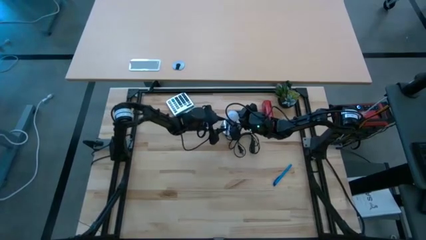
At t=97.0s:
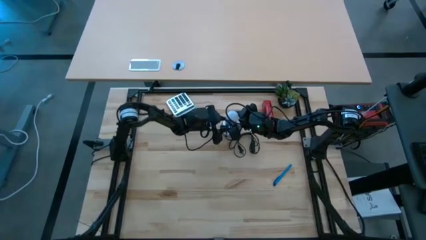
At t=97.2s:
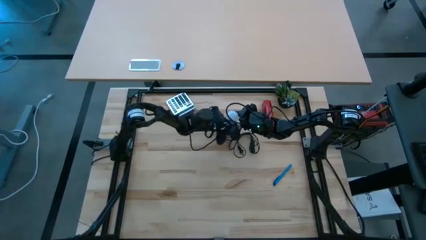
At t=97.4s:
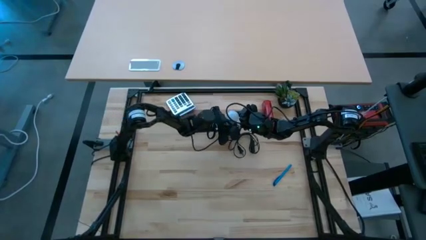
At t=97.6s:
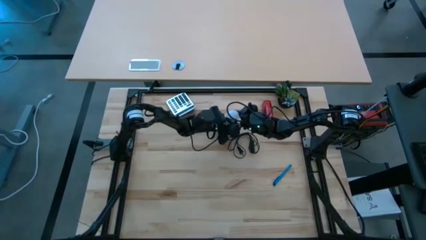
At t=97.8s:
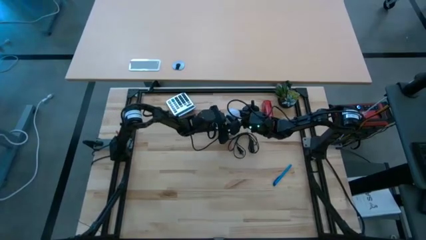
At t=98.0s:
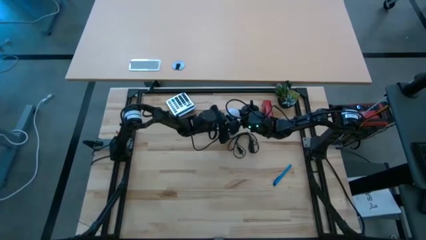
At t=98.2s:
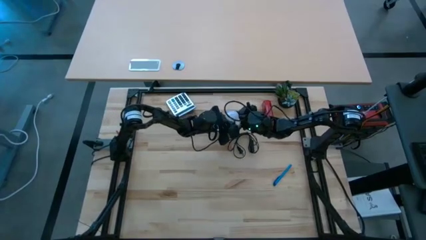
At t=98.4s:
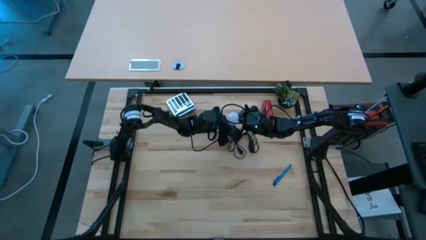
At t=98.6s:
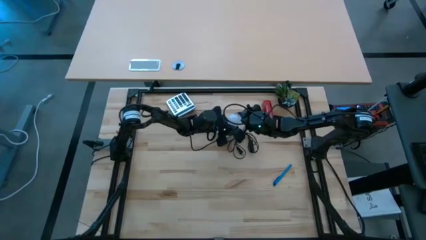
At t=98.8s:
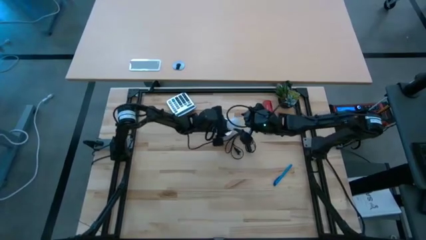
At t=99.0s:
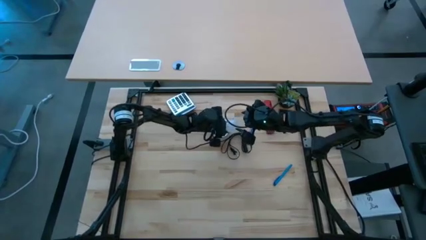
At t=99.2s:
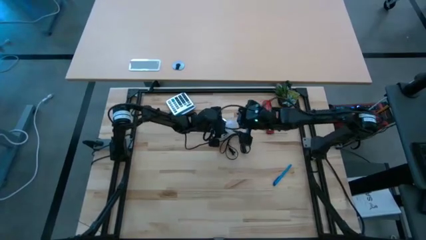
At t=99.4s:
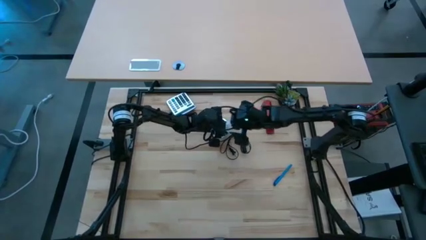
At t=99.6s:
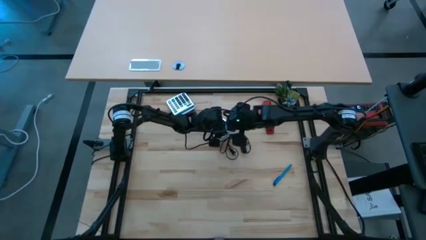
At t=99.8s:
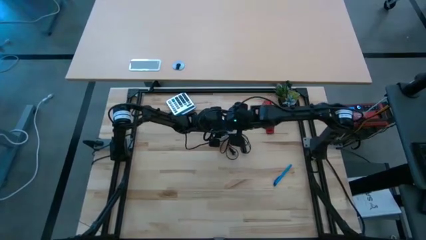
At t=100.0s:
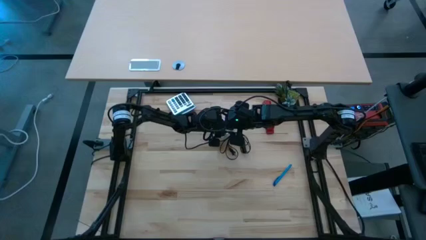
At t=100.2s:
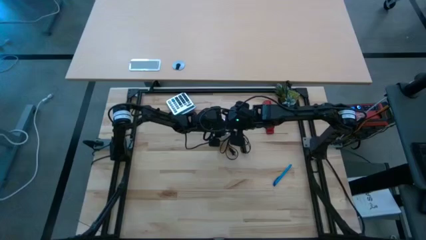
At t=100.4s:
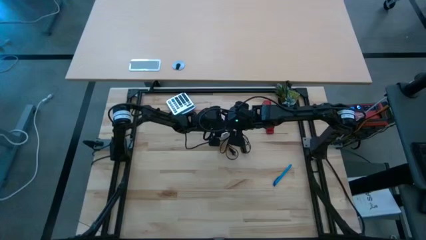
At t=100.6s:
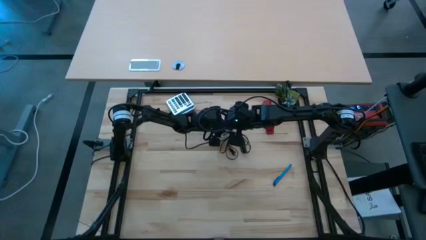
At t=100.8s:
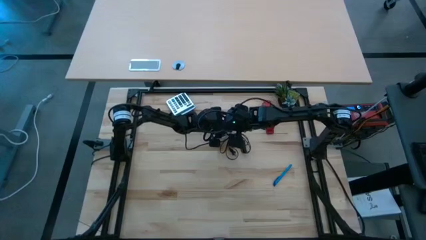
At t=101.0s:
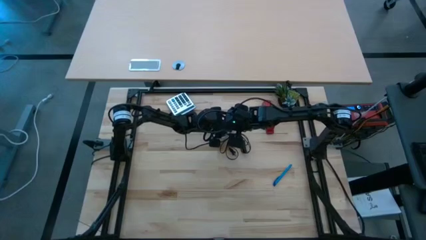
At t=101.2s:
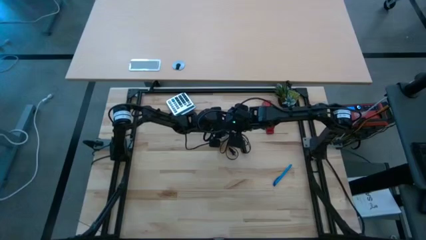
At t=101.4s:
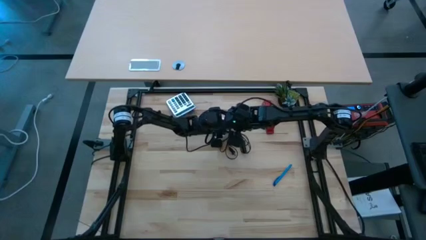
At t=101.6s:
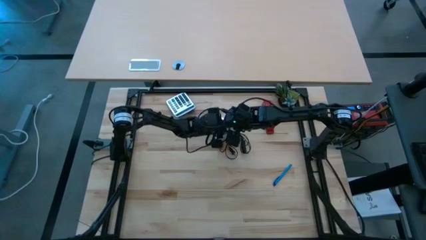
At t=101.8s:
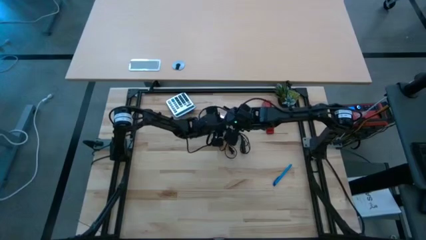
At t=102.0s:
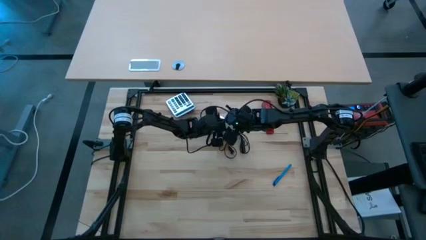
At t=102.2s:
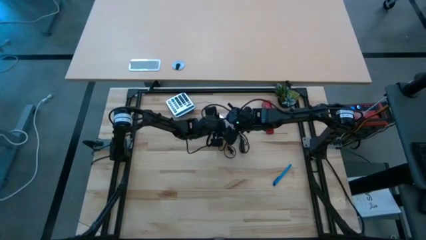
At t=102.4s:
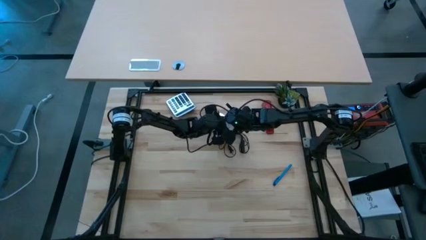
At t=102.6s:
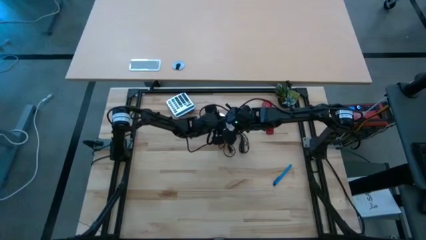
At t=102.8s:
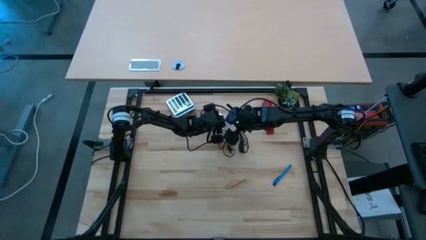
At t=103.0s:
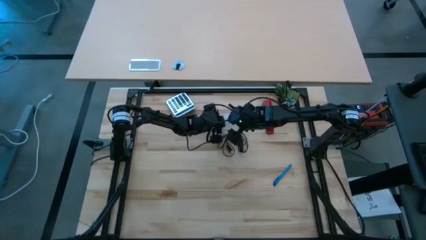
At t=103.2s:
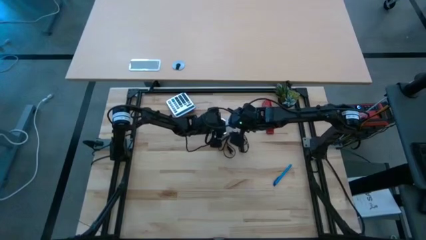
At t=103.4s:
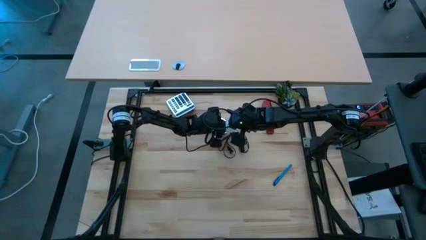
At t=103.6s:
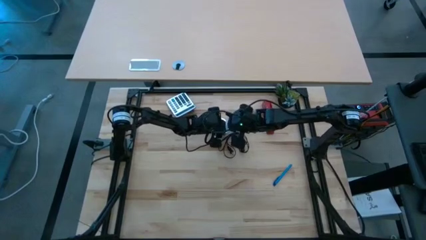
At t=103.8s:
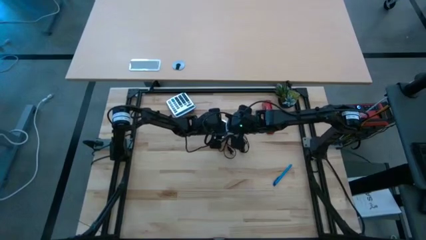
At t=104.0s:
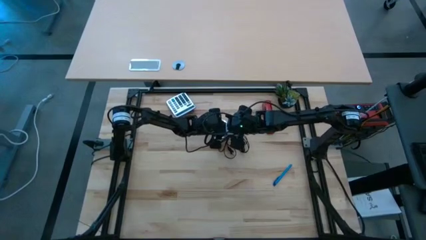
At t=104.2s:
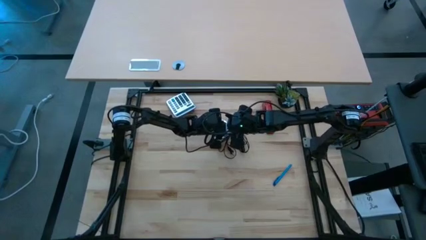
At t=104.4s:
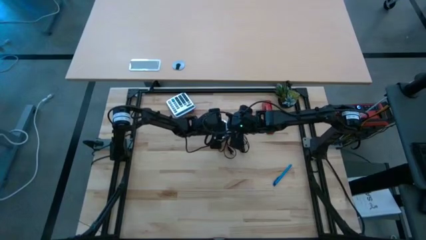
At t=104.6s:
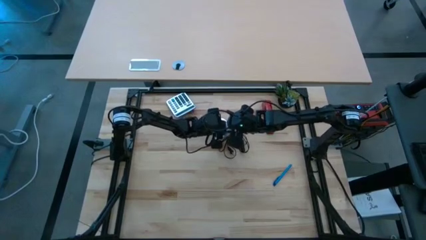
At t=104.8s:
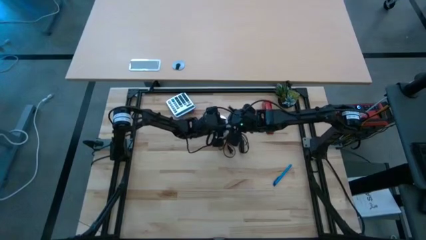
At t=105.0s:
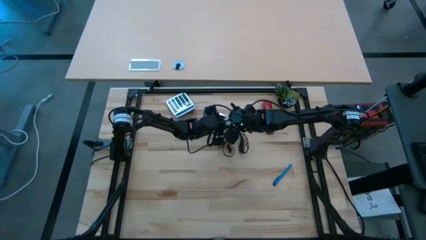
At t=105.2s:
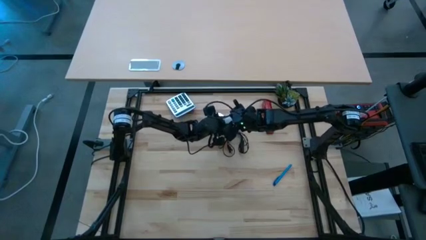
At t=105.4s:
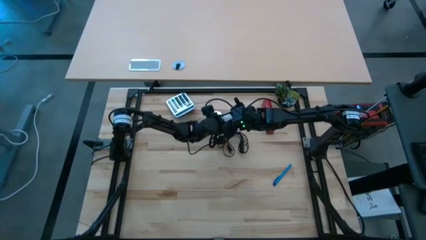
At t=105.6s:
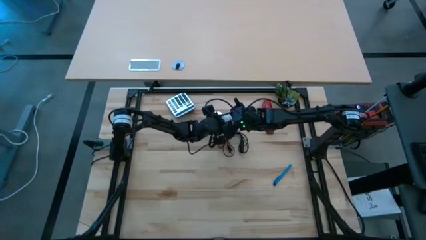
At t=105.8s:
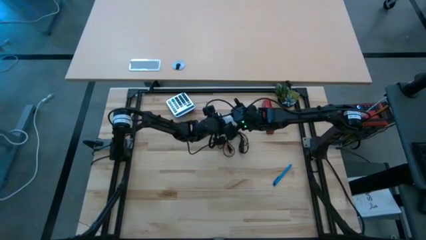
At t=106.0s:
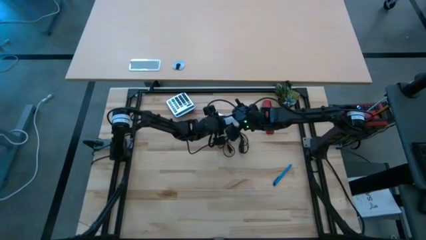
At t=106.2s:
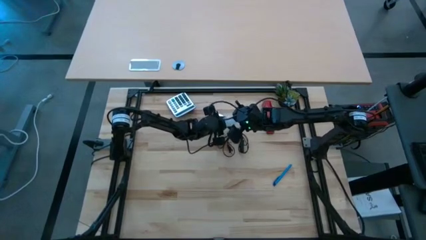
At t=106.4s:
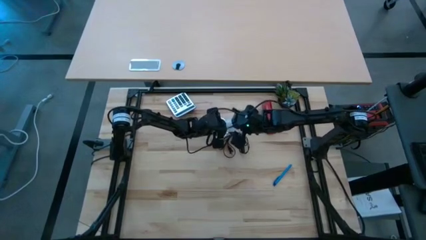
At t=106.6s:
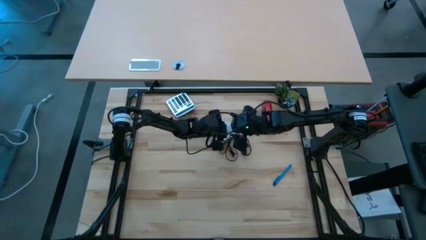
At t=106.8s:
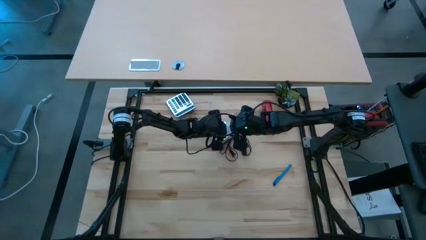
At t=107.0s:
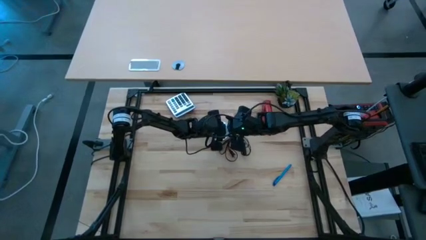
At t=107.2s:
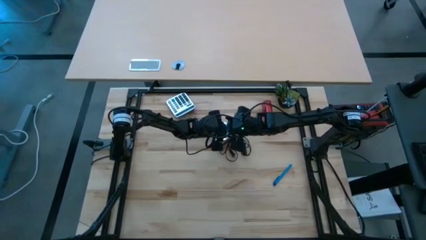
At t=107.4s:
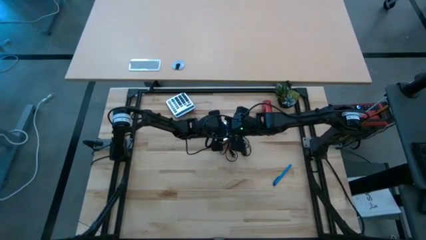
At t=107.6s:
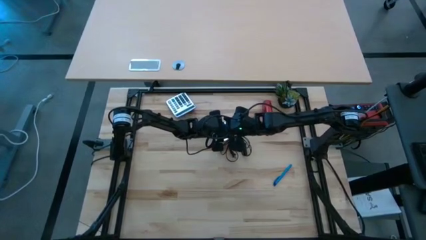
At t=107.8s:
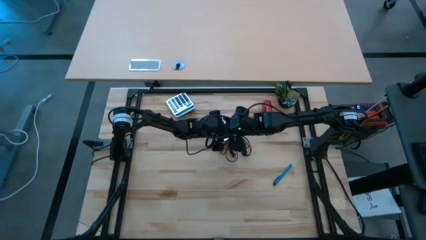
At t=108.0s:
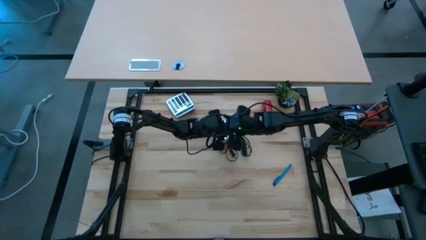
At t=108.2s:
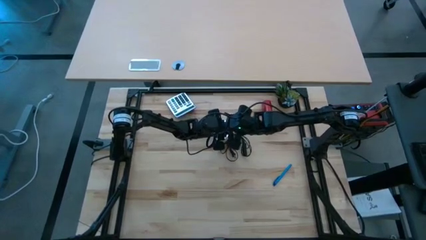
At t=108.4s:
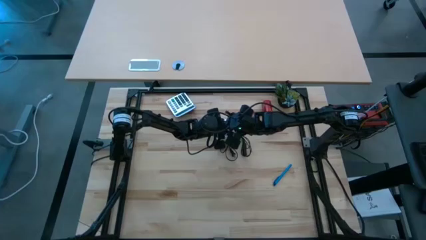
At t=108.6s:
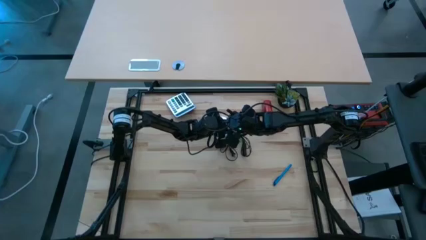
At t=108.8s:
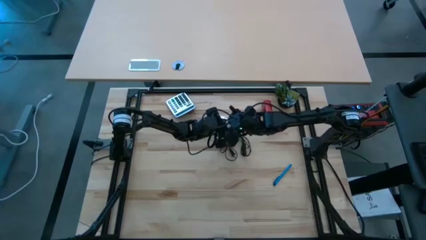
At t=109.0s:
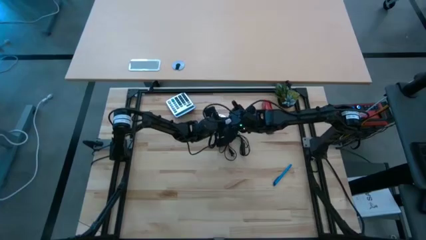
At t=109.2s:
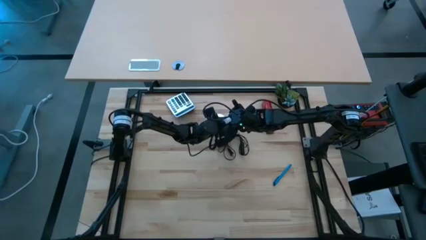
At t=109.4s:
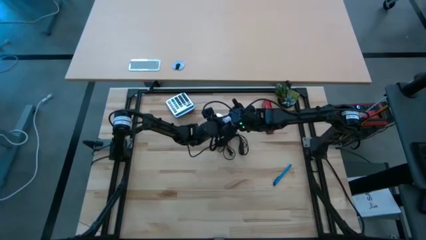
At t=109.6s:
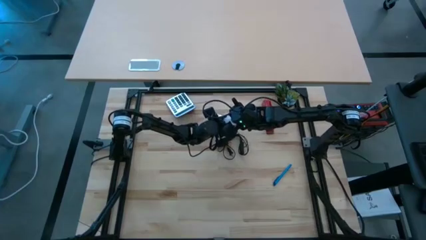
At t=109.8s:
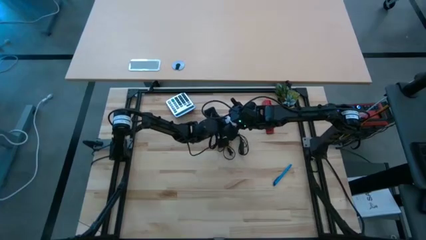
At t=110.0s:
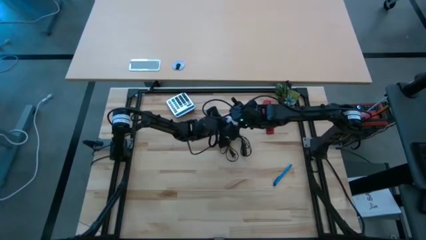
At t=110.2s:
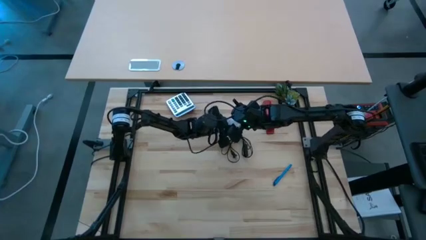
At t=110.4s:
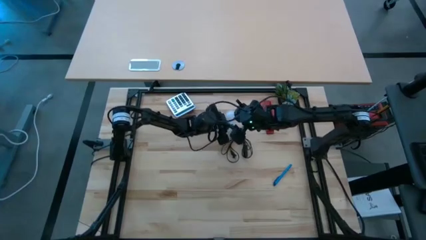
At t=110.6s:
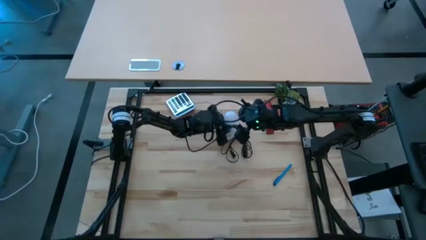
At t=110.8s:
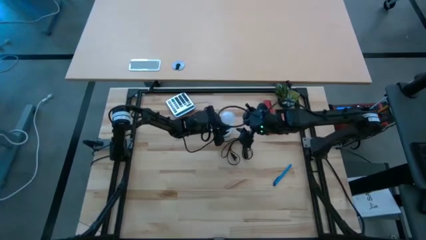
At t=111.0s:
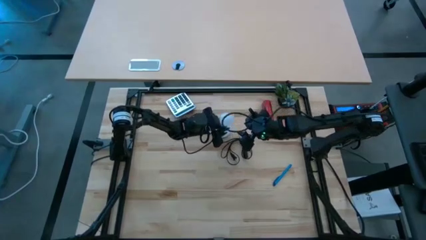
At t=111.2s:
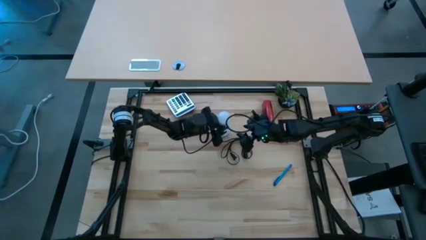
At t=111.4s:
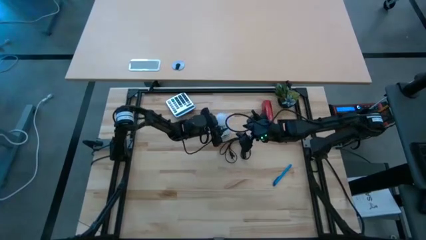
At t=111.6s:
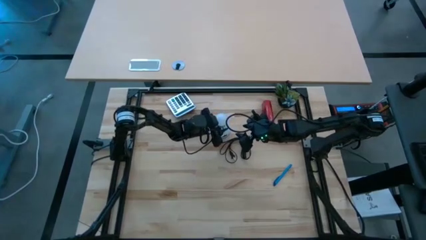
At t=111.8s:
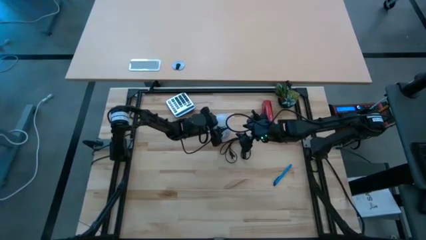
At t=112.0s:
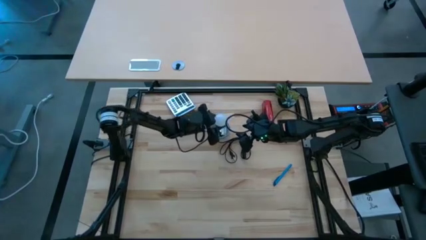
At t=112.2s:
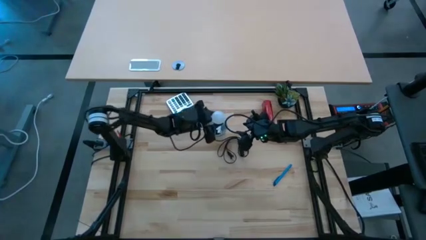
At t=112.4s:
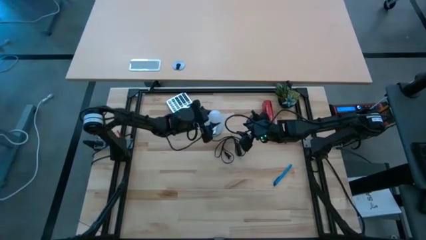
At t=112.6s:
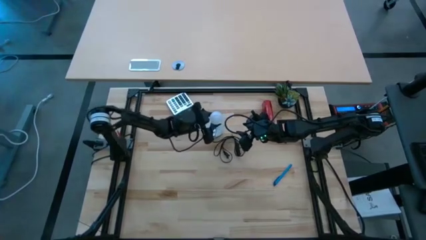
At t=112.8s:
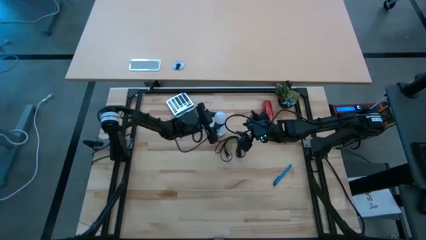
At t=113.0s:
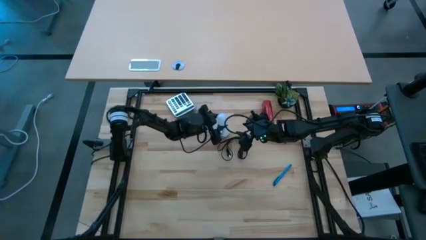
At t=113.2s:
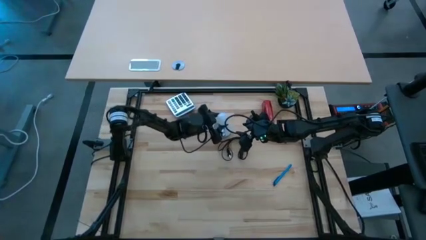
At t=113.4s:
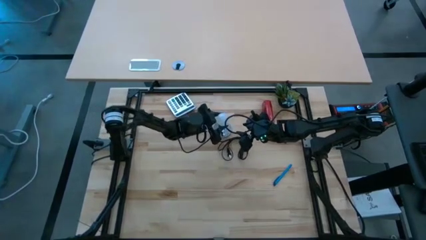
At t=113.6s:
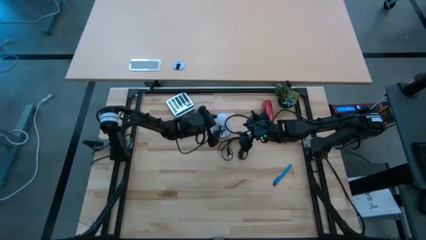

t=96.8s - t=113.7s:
Task: Screw lightbulb
Insert the white lightbulb into the silver lamp
